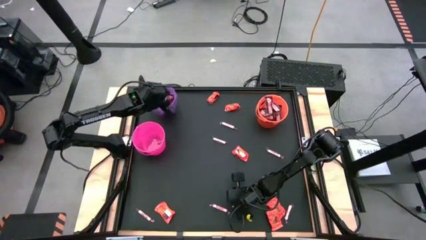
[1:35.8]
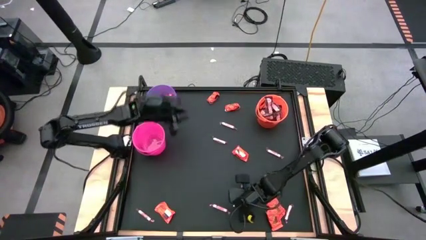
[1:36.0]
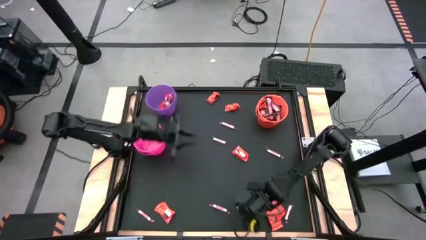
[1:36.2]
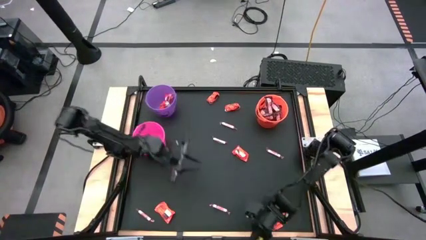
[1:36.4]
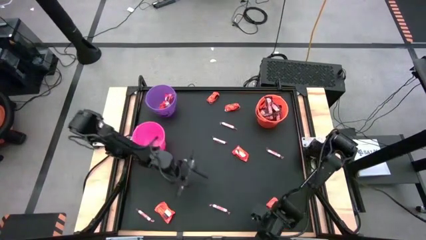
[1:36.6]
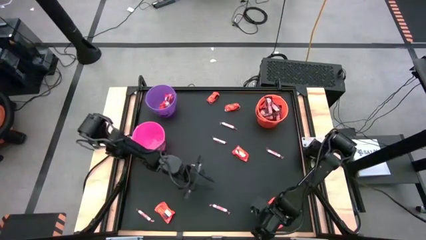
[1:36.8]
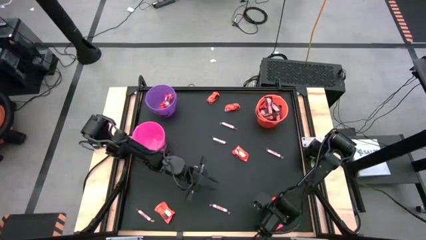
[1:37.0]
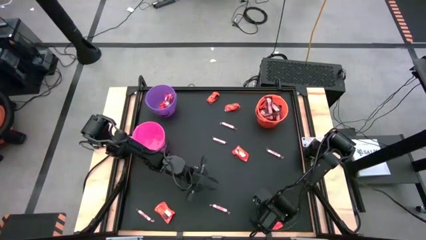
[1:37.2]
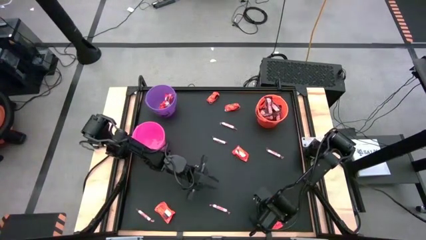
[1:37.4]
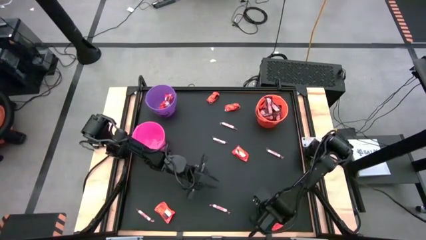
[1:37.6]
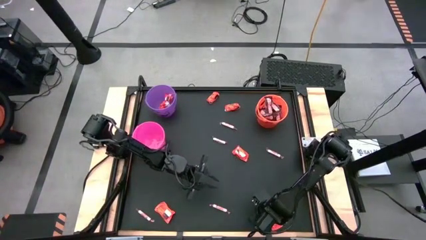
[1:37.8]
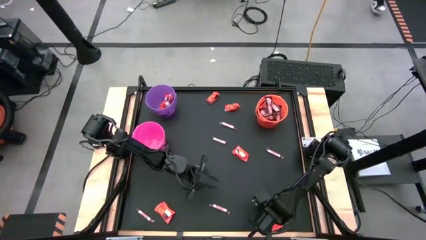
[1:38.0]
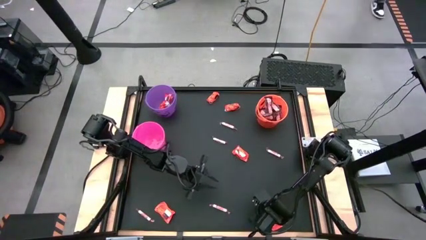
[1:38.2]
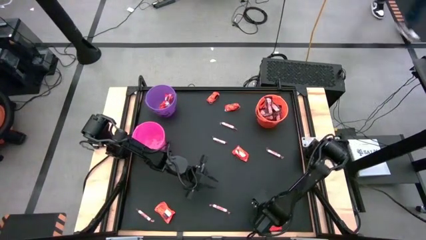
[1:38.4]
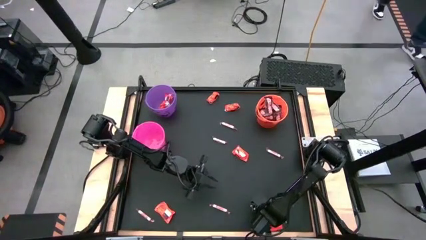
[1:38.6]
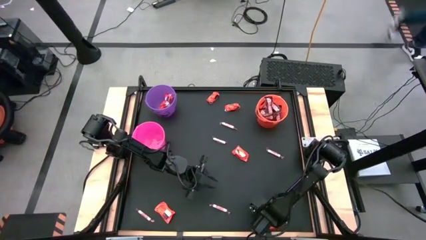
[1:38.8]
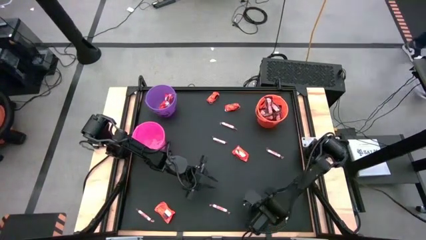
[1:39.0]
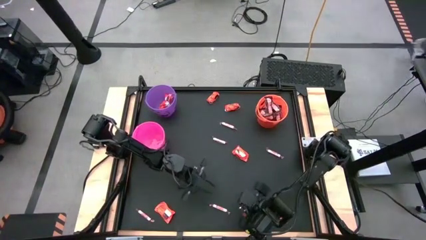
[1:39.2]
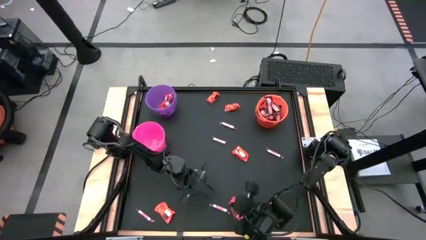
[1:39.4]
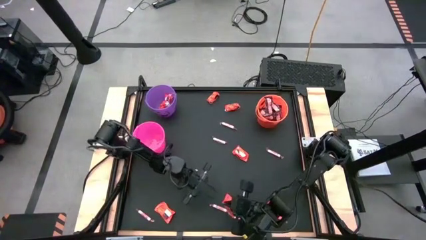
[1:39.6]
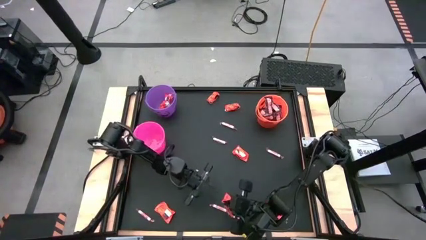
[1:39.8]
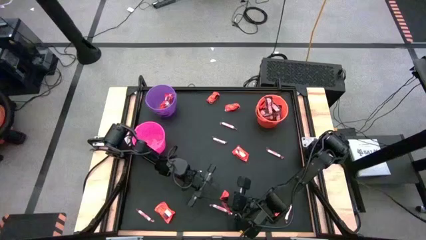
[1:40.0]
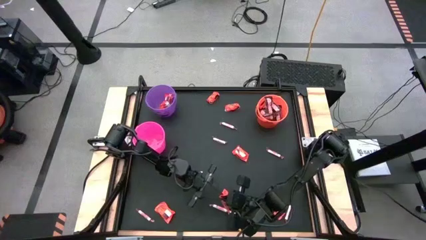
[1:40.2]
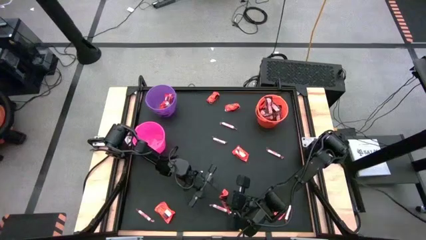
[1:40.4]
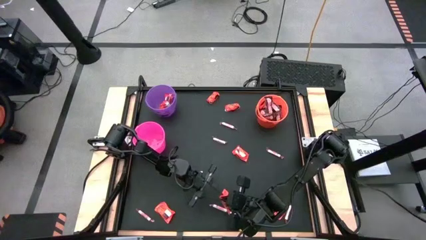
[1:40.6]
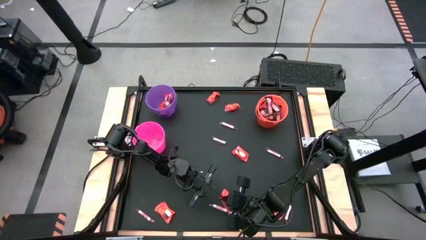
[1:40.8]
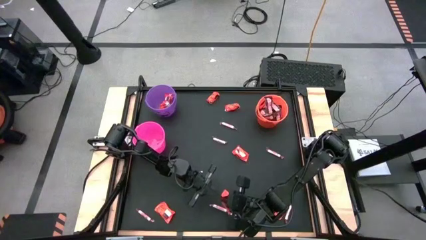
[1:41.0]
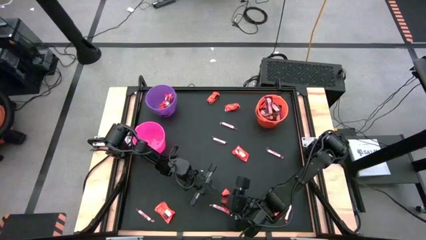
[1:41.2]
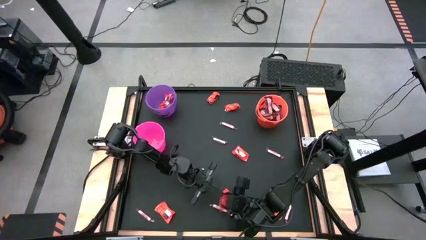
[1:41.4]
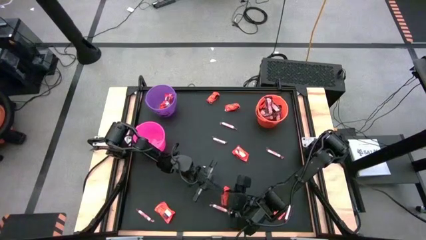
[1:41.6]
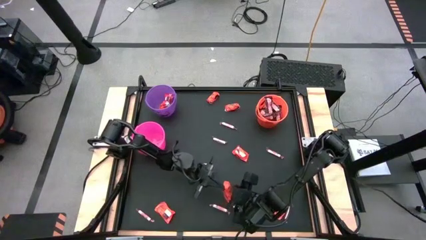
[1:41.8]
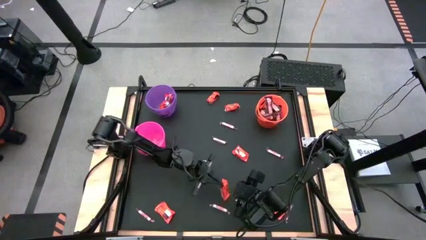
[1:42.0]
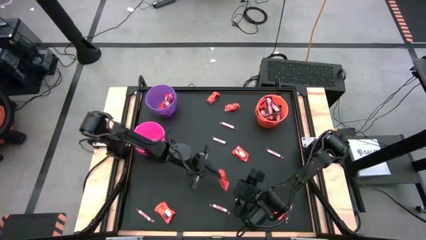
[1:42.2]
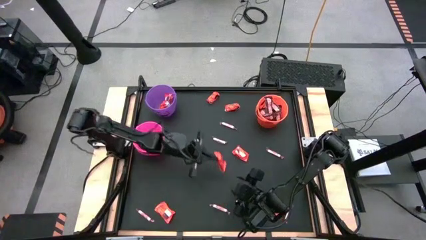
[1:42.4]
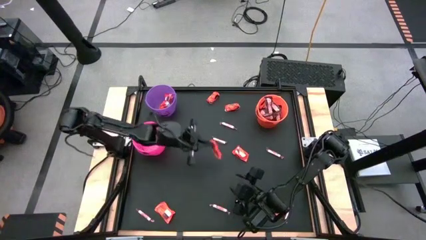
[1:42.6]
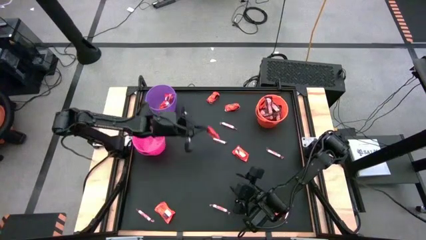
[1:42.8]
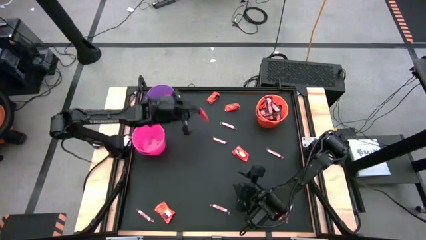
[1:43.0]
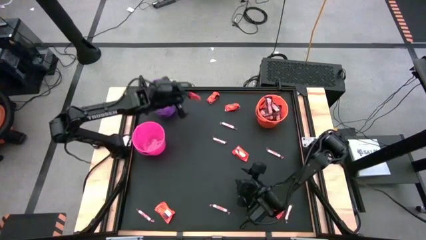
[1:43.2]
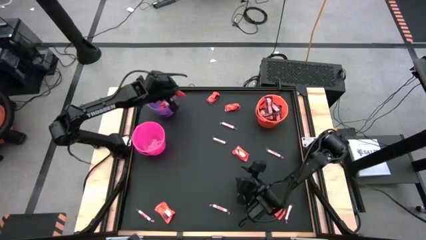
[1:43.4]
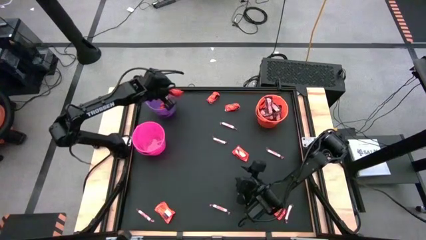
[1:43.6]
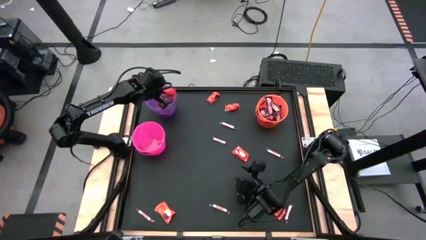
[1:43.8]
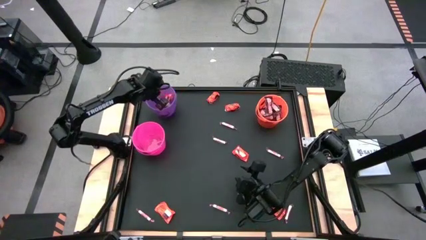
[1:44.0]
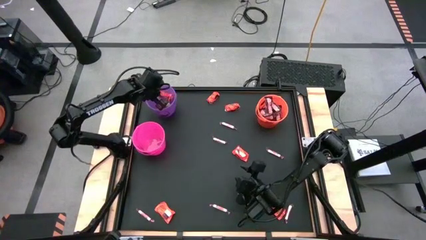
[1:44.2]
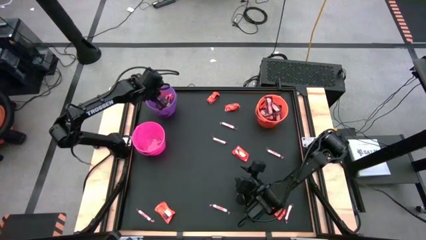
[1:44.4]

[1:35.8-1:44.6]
Task: Sort candy by brand, put in halloween buckets
Put the orange candy into the purple bucket

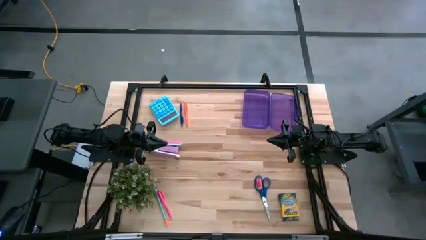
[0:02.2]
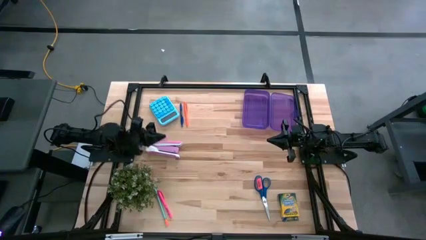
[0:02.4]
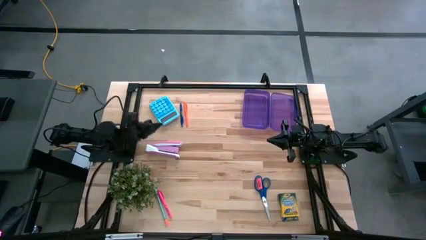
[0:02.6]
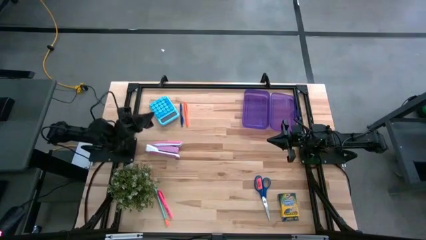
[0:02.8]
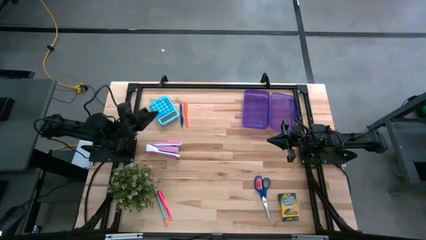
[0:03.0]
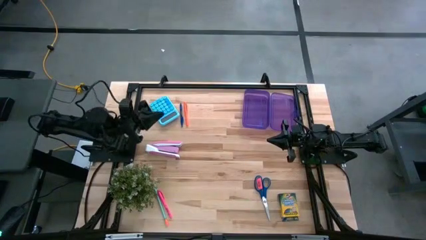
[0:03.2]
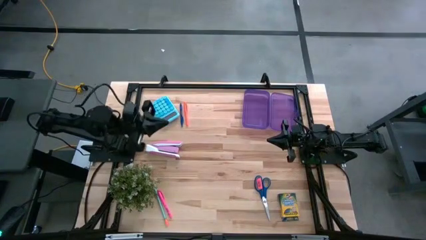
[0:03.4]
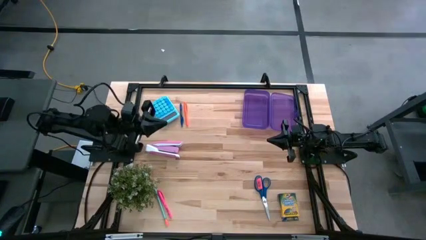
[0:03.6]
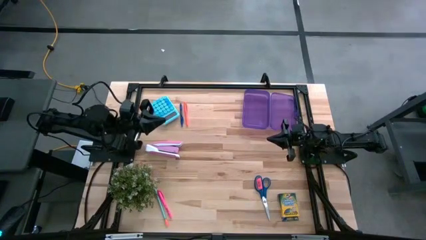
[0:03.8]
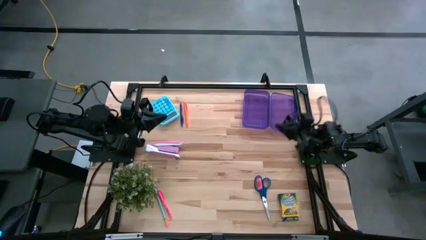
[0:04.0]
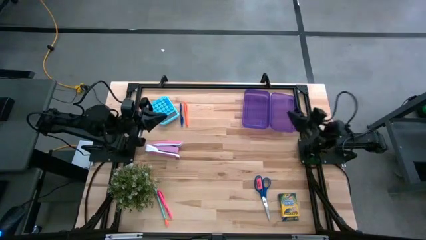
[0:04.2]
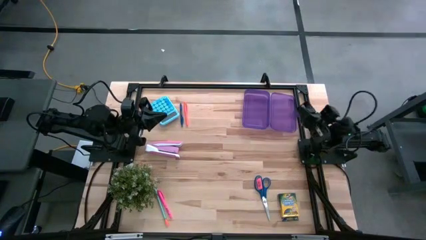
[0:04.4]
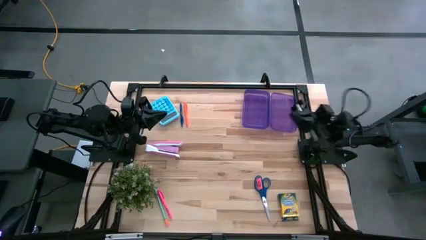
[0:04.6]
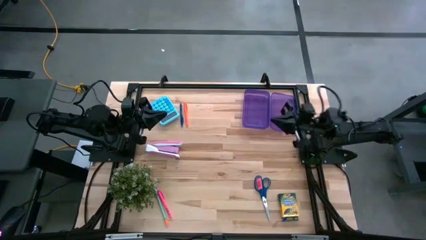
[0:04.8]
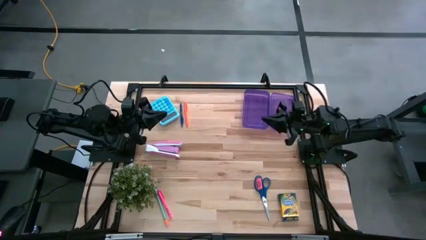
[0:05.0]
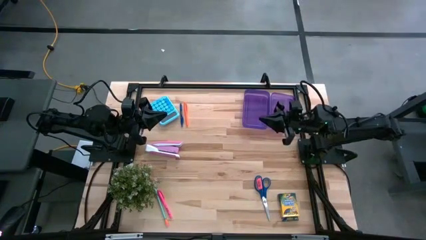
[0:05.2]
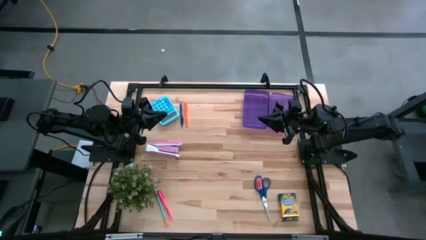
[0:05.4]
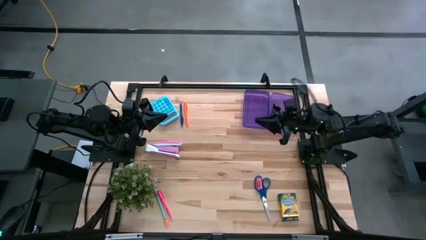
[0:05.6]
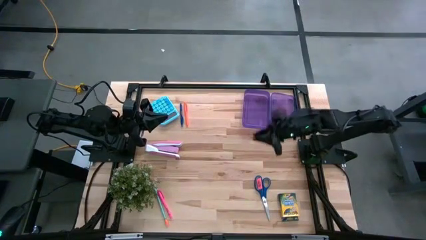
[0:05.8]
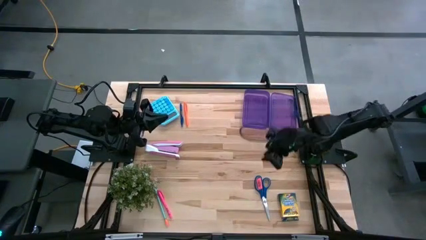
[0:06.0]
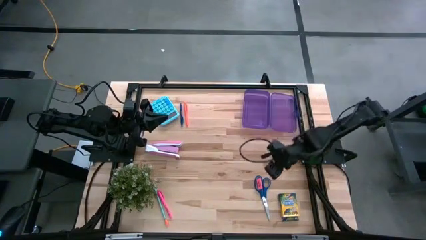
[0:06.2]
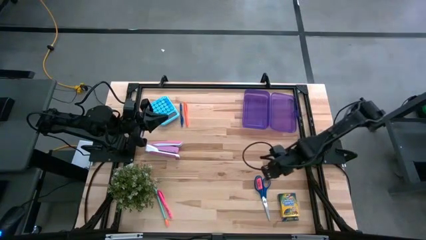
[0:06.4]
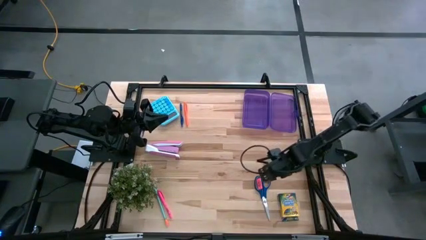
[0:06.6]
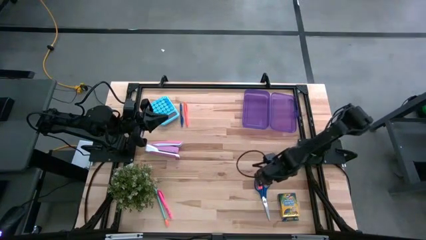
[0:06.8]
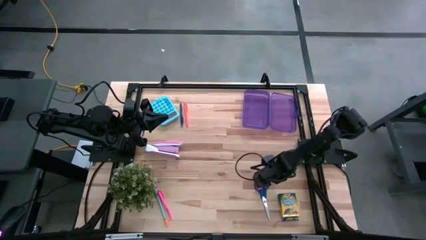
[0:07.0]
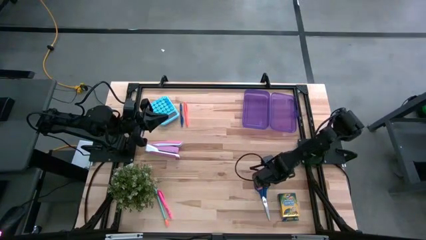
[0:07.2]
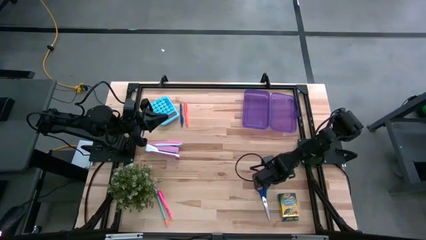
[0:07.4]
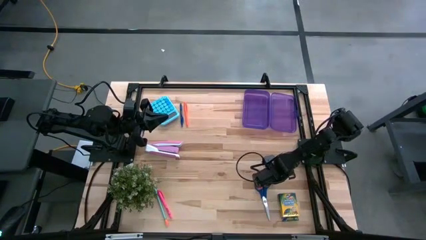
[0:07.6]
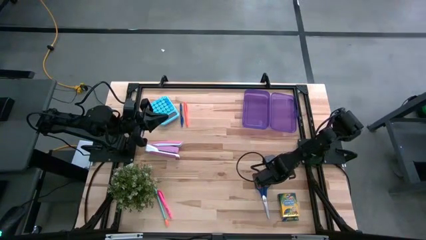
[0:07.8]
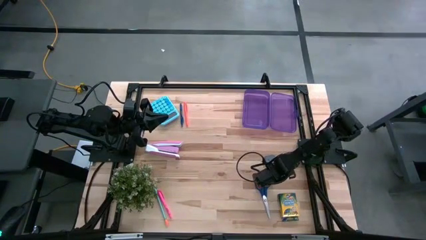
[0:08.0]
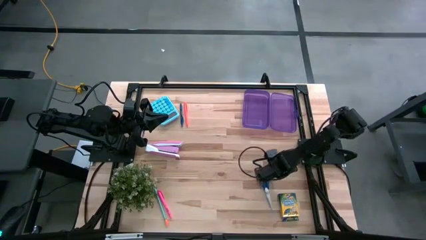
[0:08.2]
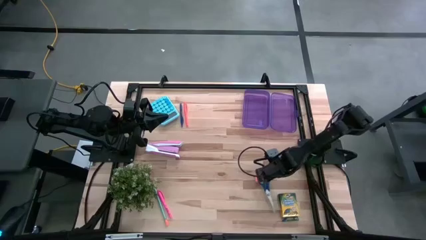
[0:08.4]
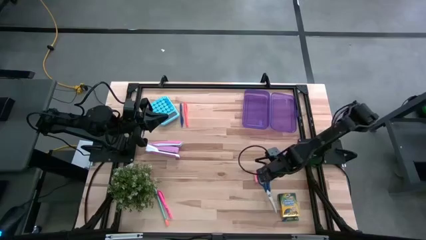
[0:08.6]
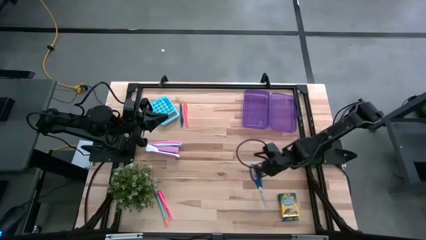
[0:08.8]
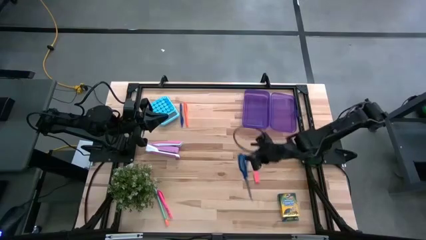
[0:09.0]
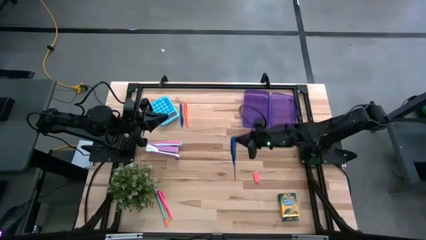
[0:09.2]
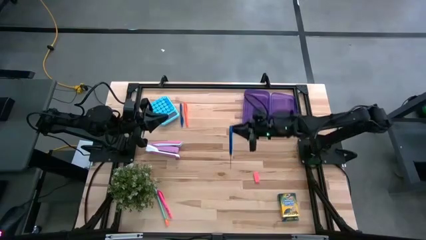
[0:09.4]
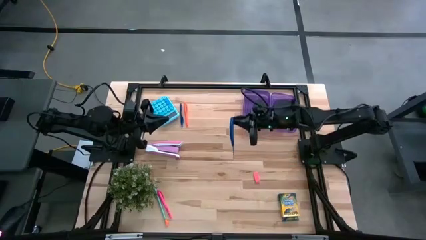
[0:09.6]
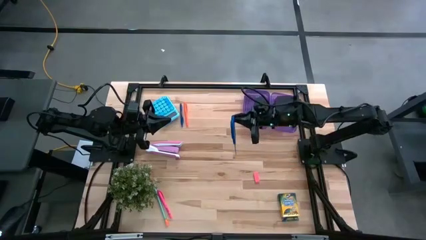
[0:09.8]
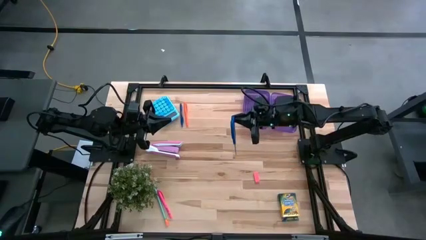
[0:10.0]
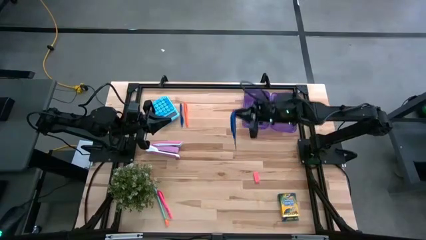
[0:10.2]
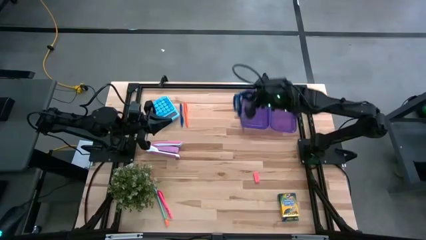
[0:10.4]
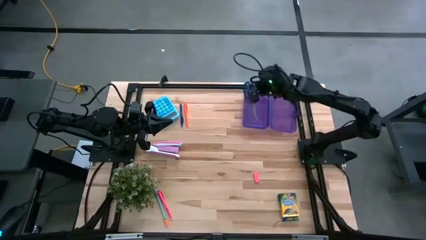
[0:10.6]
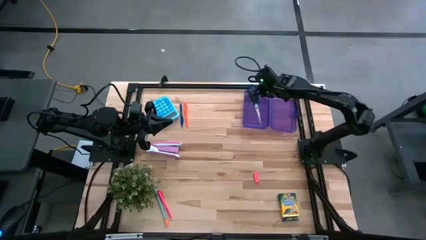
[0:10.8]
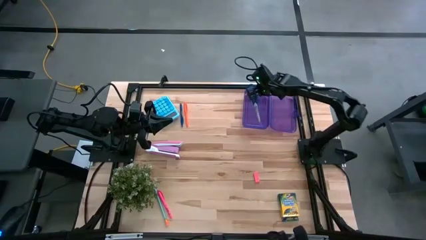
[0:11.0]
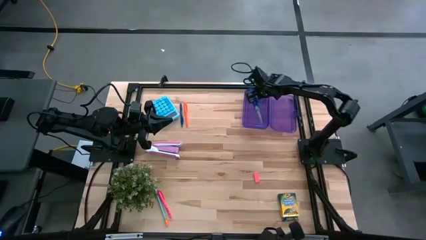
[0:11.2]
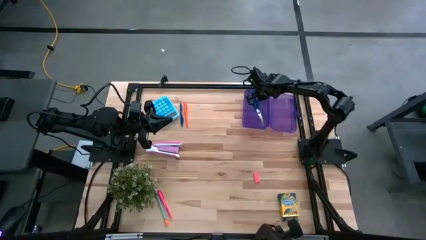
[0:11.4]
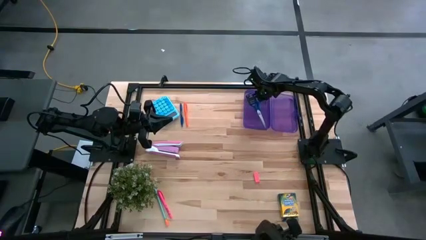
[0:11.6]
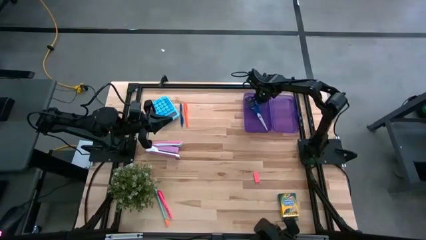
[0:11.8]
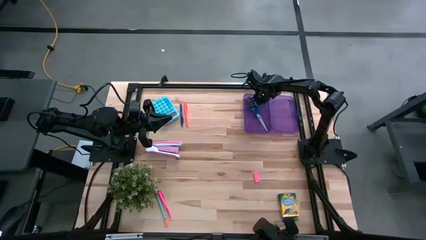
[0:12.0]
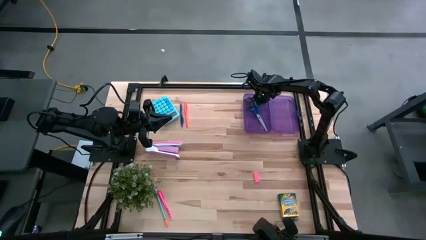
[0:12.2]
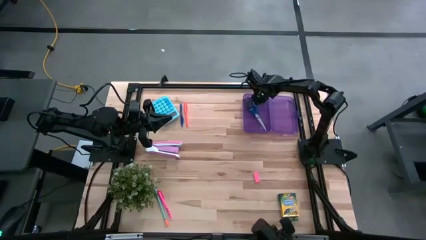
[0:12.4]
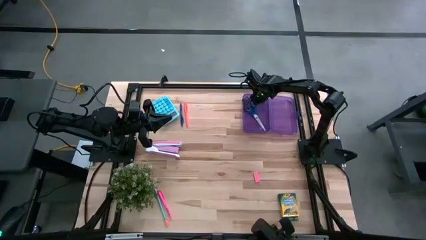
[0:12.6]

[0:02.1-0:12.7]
Task: Pack school essentials
Put the blue scissors into the violet supply box
